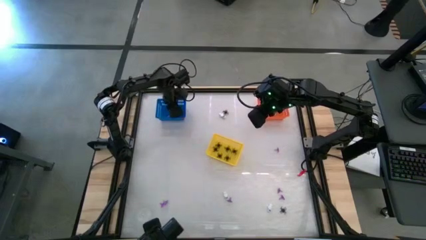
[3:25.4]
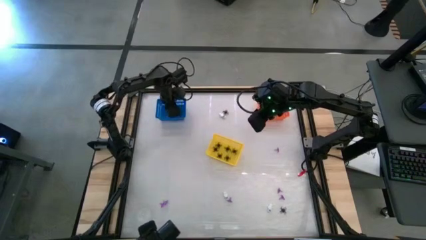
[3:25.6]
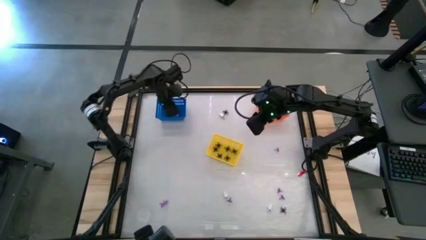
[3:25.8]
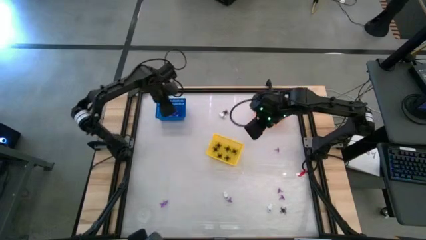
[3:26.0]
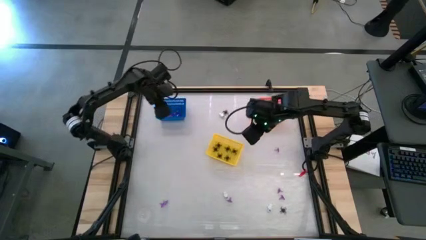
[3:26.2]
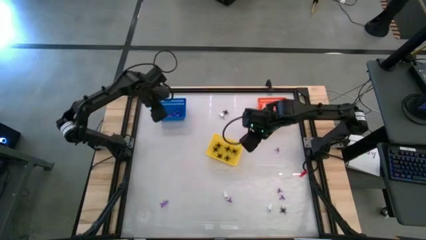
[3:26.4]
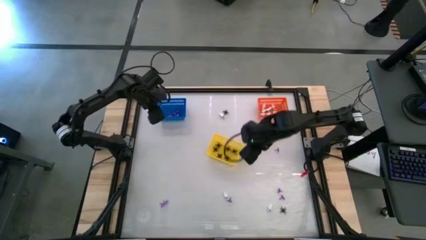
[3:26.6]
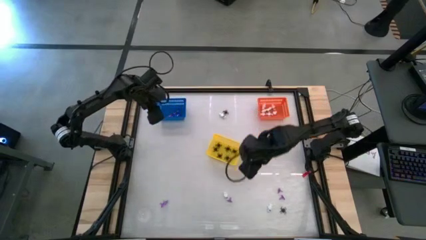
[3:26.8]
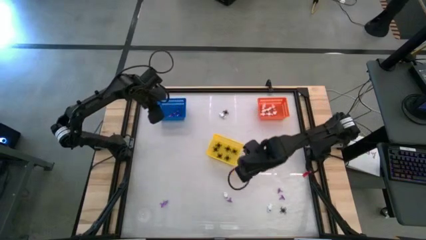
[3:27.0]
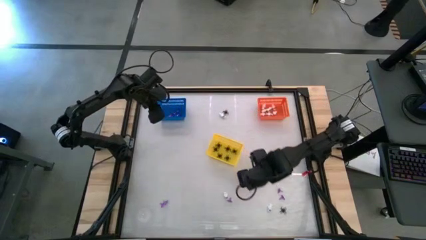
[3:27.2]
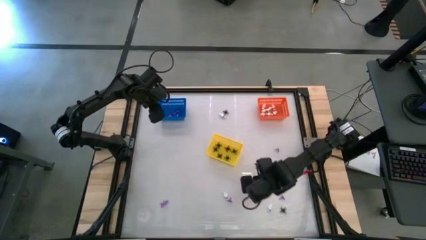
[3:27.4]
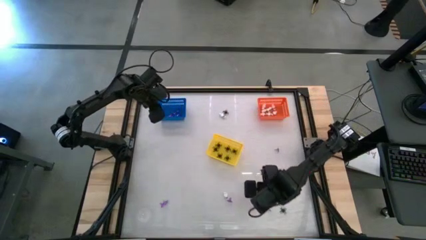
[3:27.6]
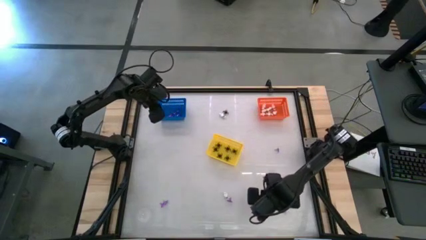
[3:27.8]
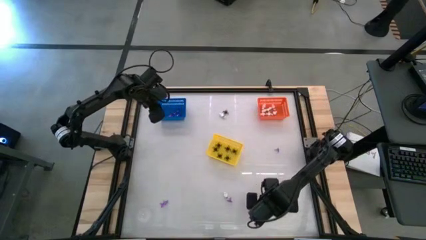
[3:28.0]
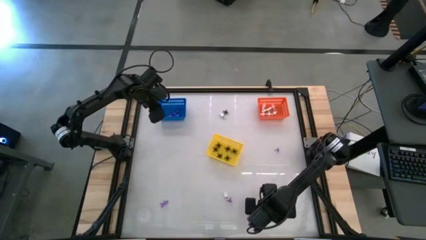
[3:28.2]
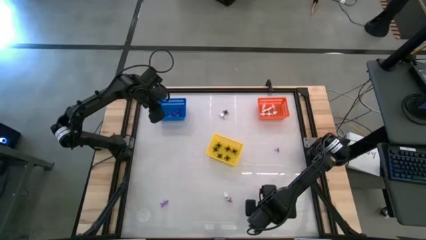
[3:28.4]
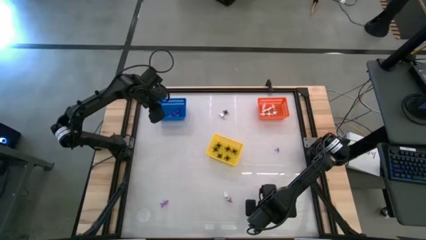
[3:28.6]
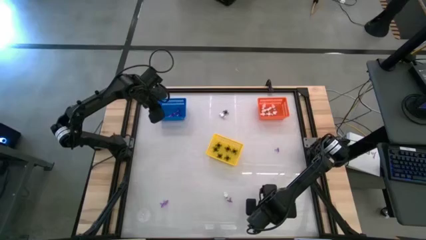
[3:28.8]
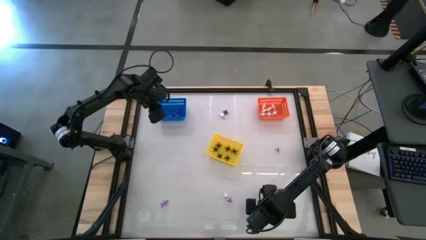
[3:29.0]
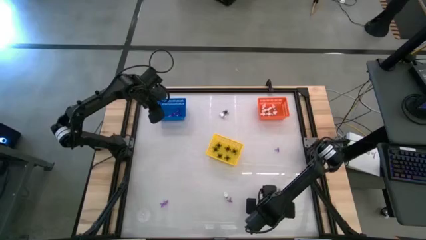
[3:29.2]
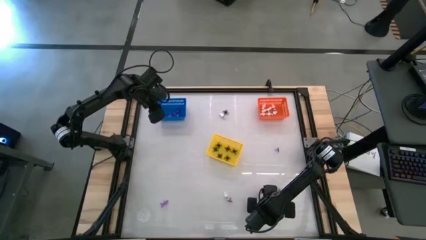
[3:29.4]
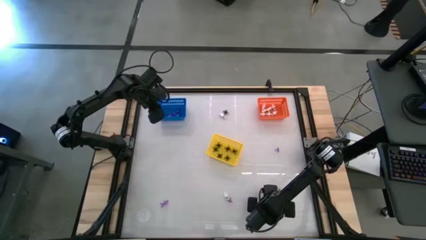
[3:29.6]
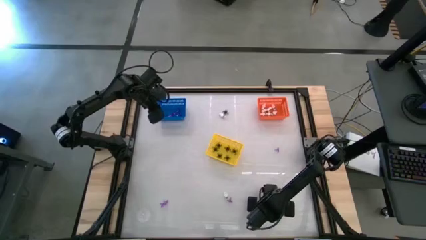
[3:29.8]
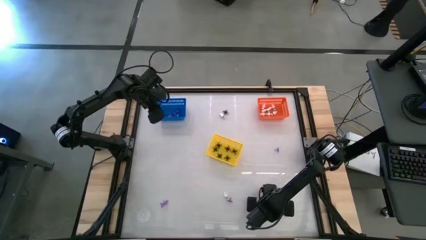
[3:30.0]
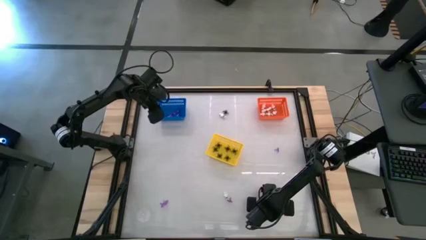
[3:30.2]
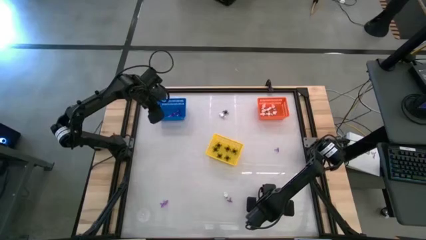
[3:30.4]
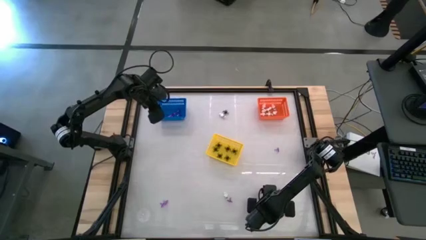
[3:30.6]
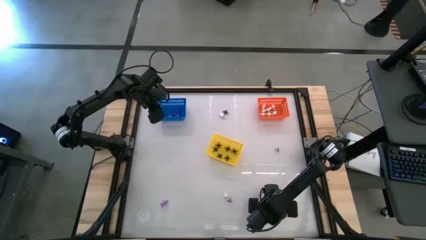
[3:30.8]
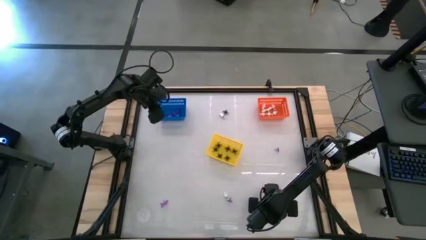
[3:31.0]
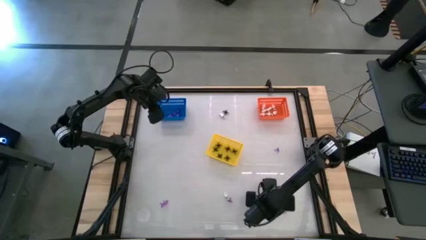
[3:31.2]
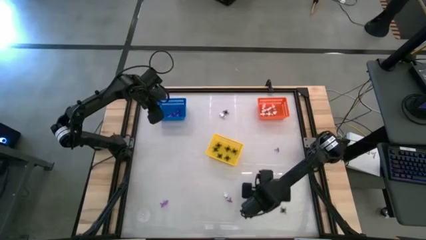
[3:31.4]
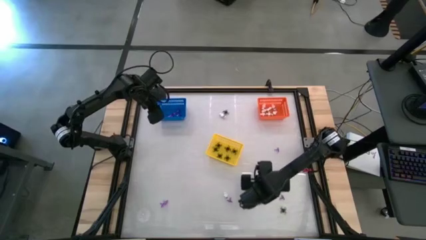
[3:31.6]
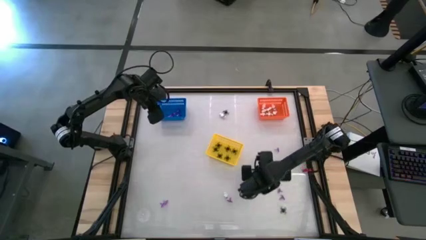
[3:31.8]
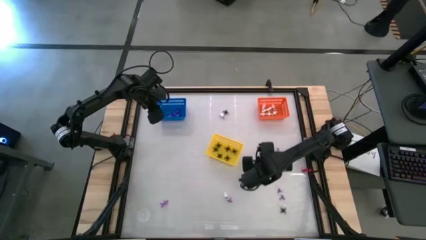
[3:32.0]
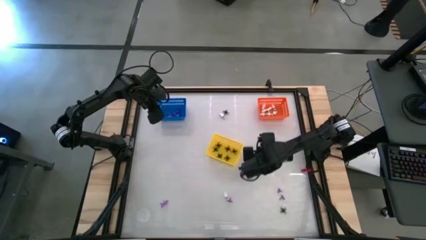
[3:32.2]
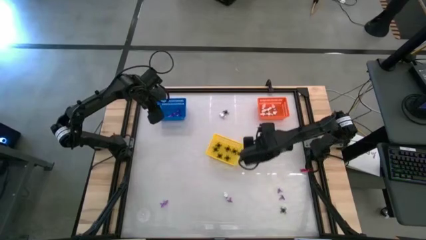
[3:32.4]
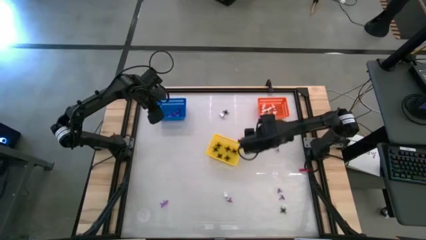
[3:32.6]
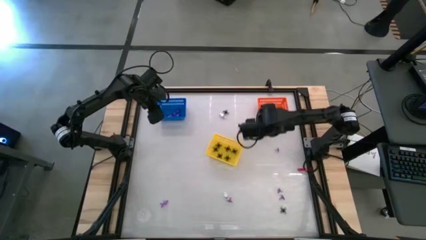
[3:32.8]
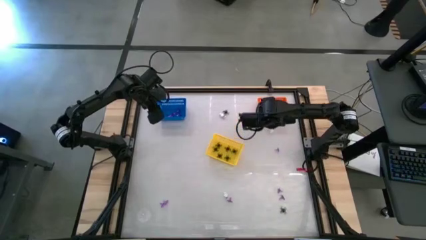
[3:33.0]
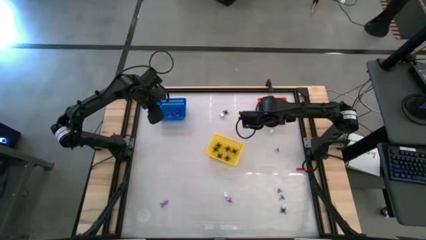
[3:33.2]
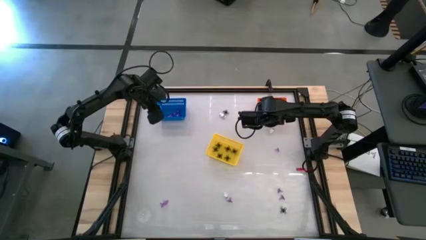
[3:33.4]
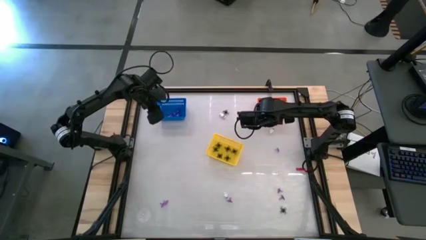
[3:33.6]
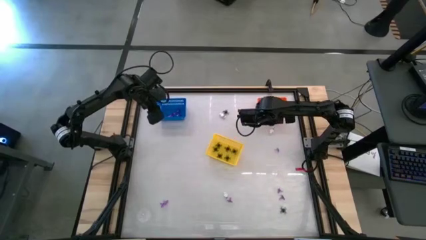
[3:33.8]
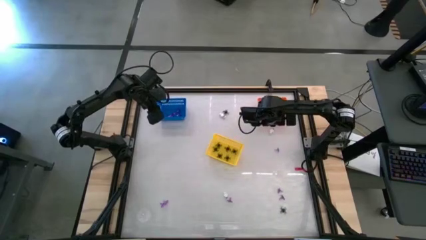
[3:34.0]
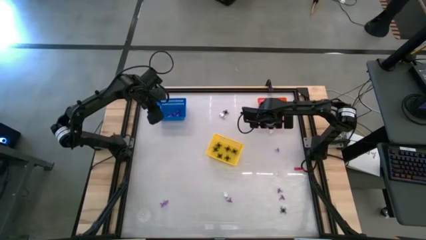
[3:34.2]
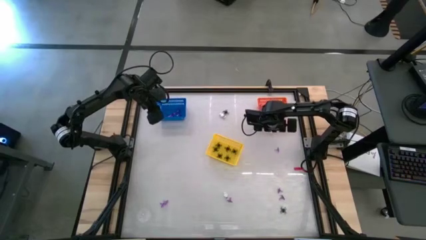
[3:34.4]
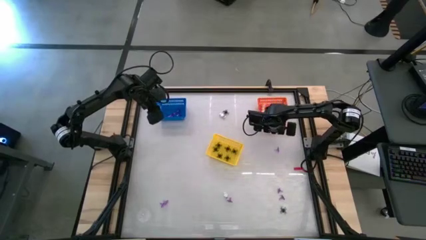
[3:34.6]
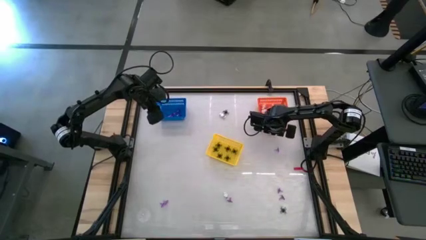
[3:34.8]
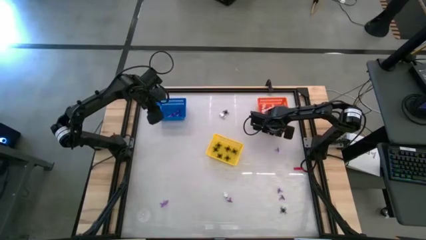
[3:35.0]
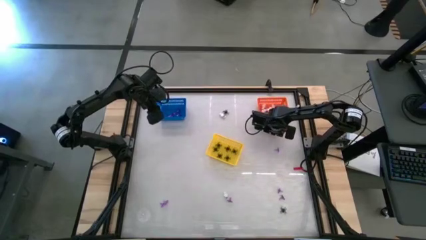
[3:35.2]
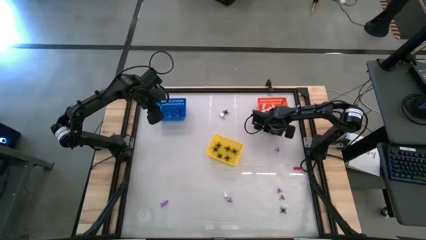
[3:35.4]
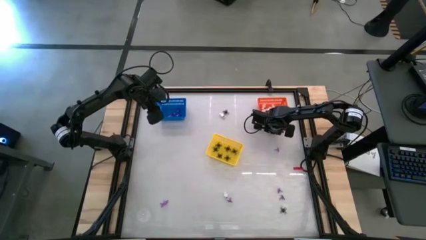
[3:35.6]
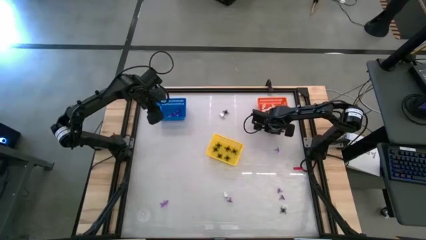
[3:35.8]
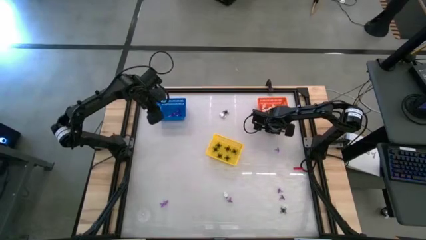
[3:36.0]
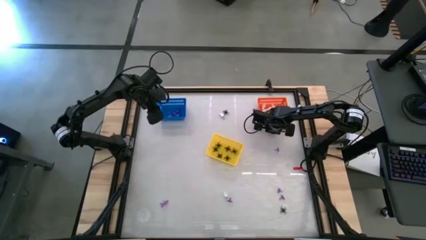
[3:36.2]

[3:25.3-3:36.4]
Task: Sort Halloween decoration
Put the white skeleton toy into the orange bin

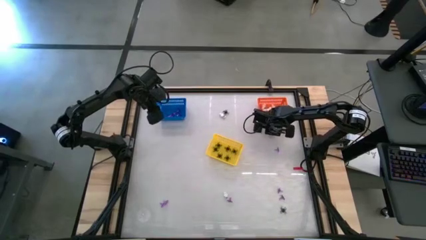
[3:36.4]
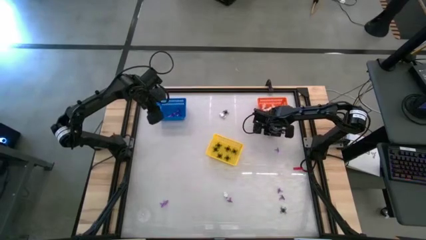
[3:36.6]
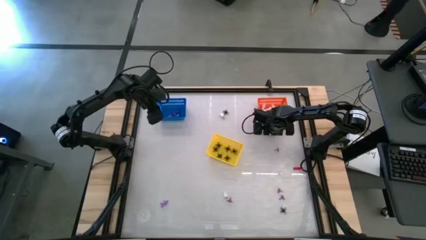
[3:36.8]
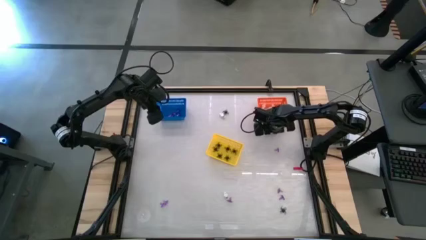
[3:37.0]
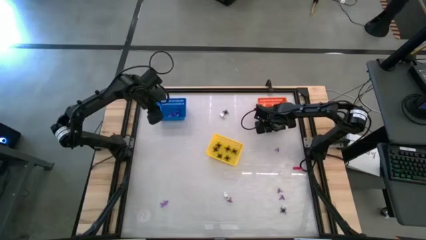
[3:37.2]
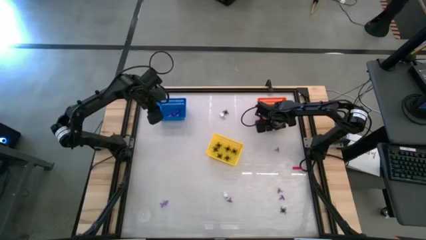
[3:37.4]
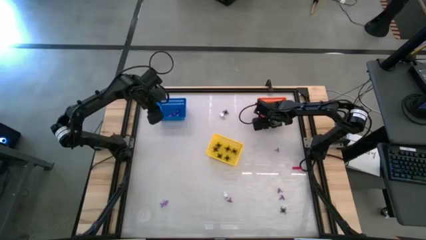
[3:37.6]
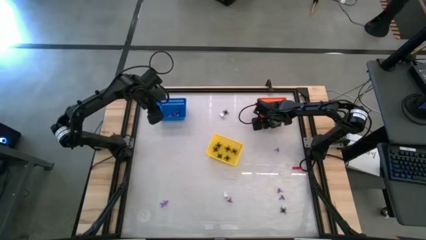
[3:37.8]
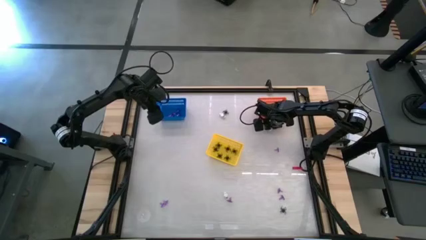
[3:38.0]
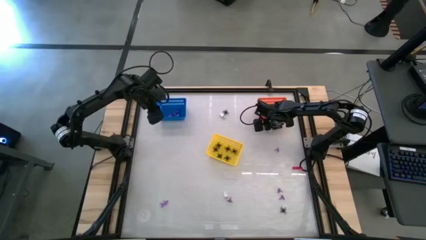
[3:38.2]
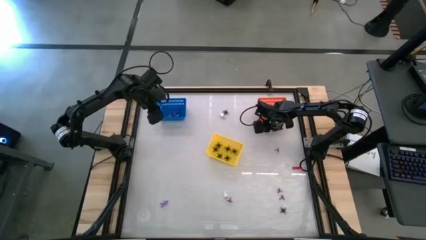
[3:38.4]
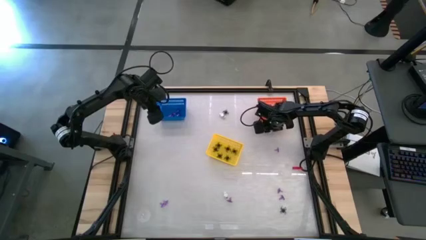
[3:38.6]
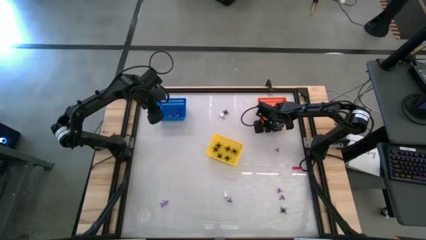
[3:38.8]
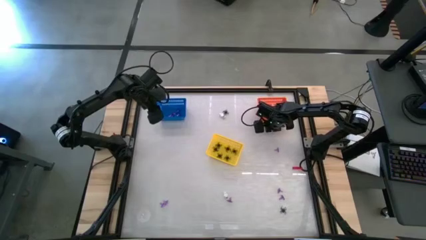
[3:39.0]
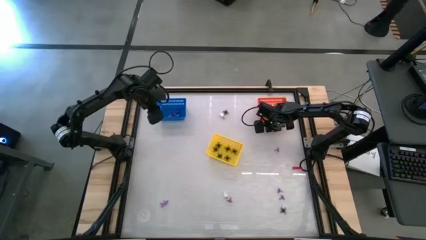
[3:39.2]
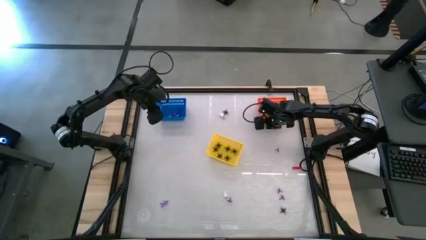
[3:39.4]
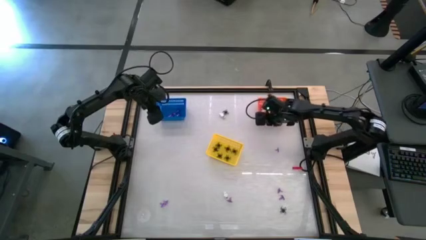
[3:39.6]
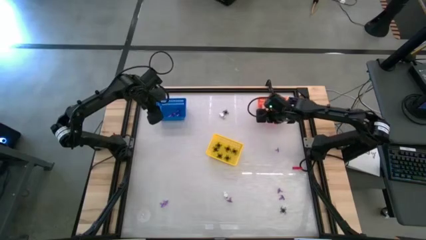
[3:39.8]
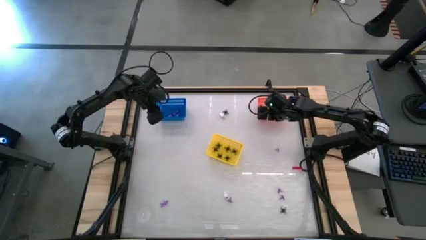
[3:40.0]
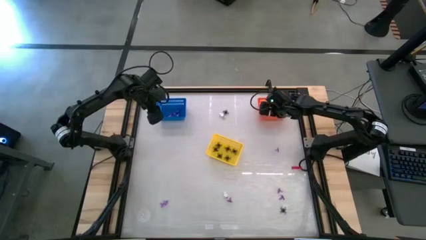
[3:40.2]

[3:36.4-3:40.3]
Put the white skeleton toy into the orange bin
